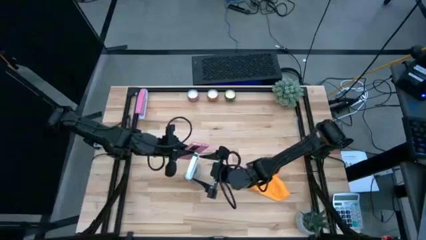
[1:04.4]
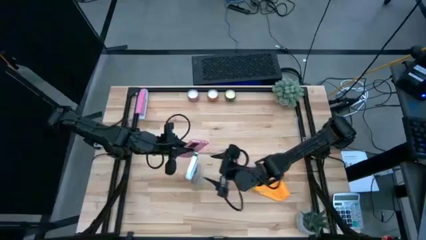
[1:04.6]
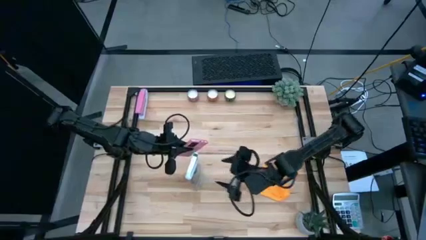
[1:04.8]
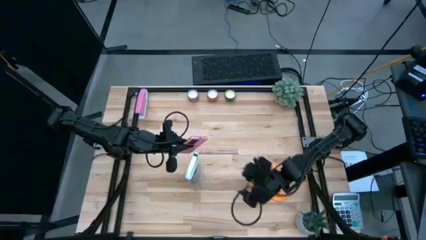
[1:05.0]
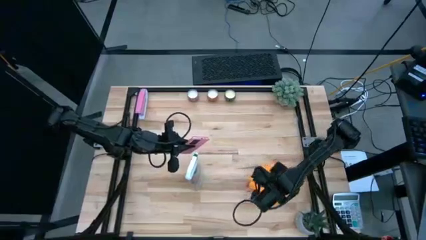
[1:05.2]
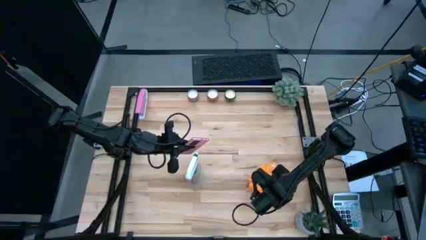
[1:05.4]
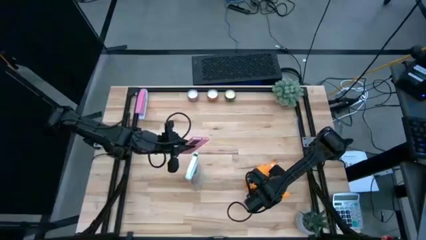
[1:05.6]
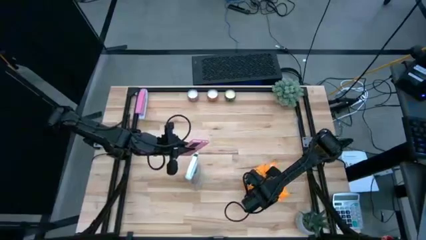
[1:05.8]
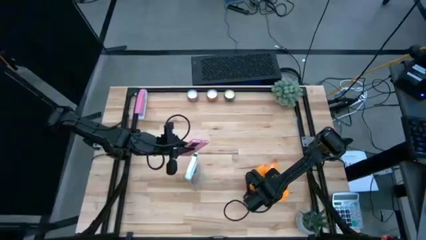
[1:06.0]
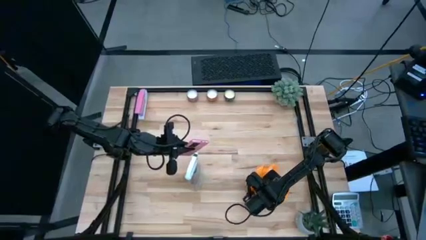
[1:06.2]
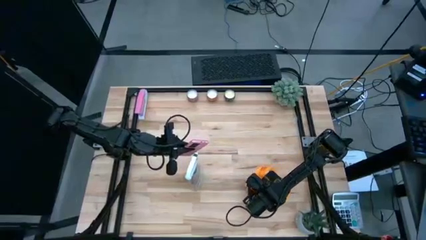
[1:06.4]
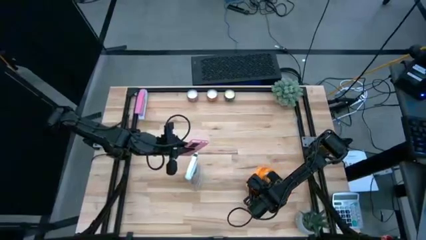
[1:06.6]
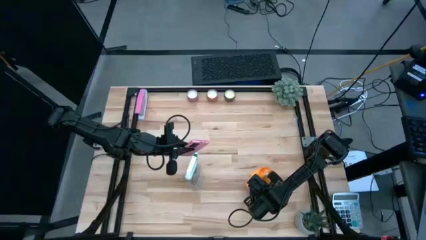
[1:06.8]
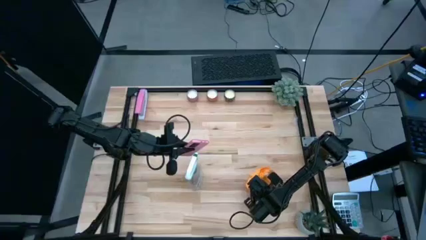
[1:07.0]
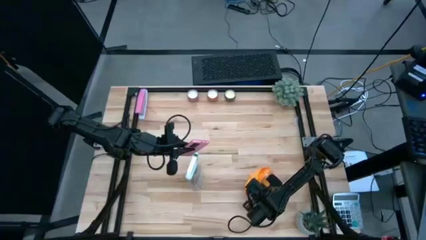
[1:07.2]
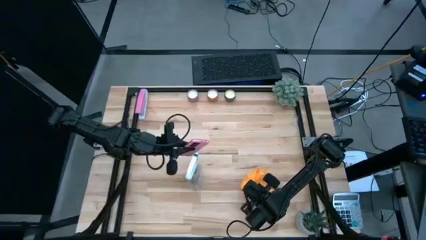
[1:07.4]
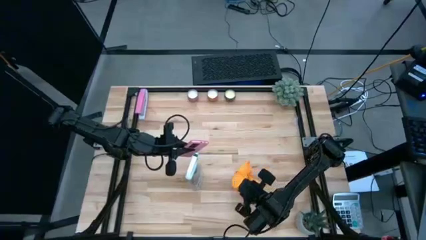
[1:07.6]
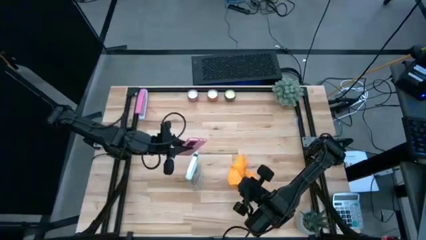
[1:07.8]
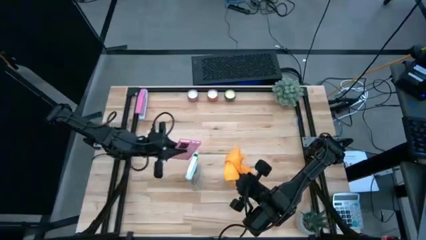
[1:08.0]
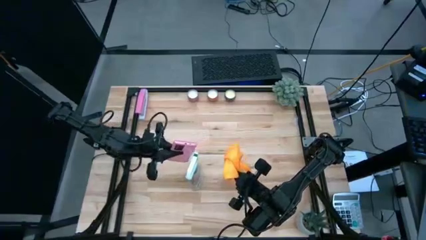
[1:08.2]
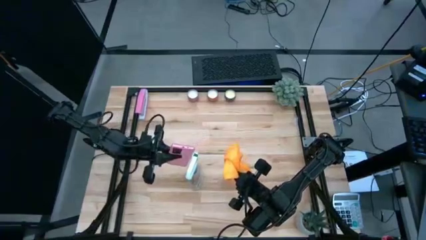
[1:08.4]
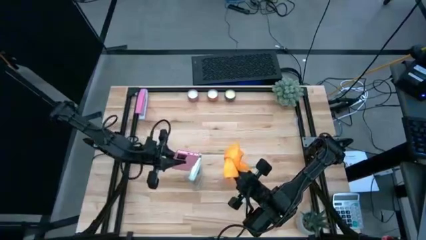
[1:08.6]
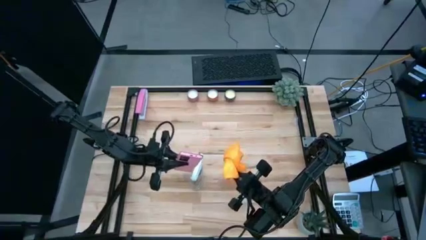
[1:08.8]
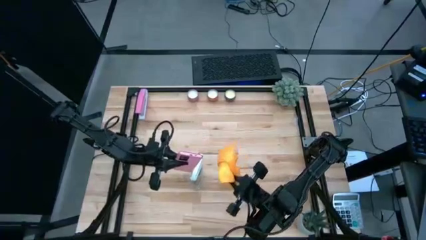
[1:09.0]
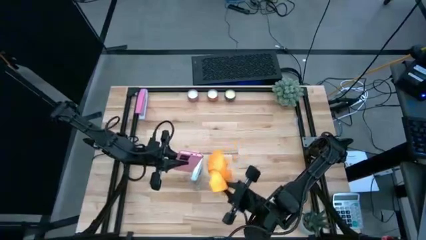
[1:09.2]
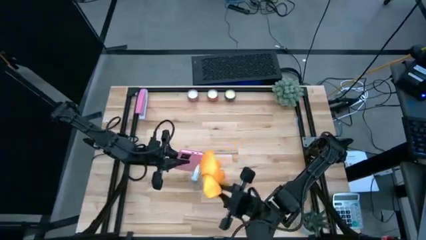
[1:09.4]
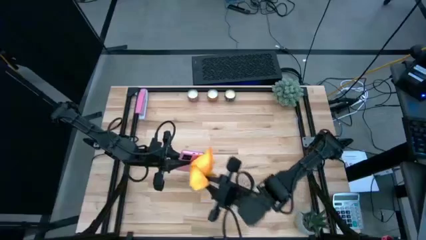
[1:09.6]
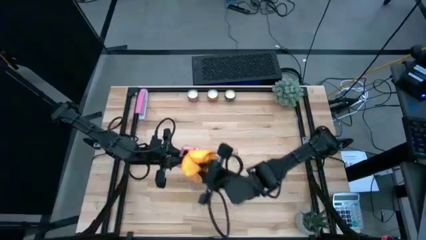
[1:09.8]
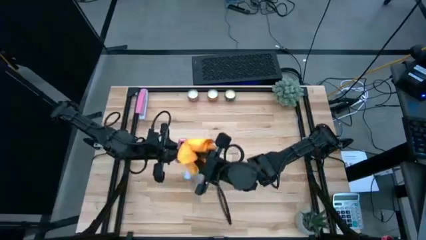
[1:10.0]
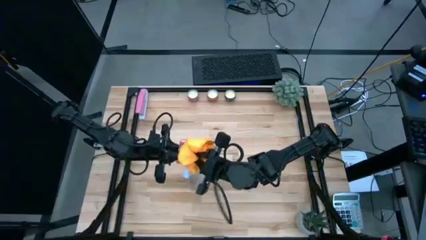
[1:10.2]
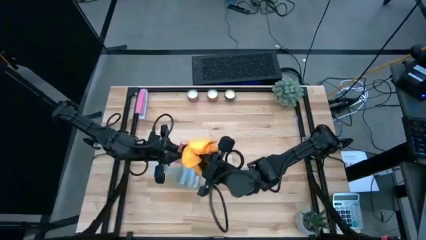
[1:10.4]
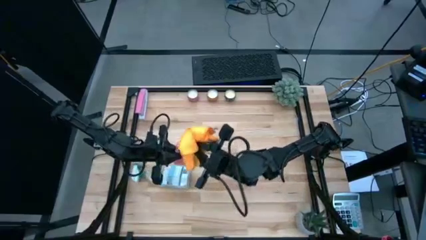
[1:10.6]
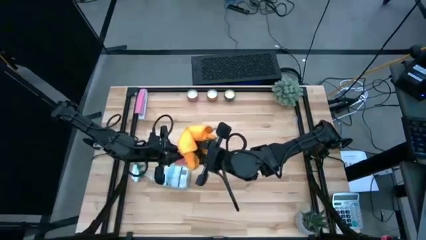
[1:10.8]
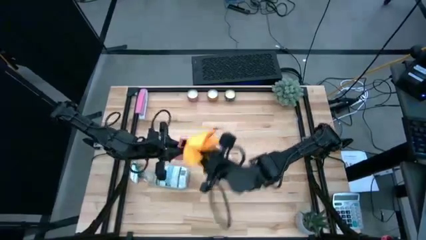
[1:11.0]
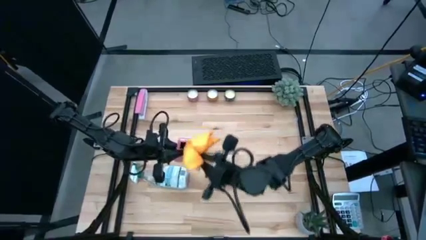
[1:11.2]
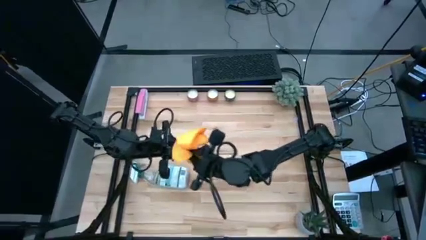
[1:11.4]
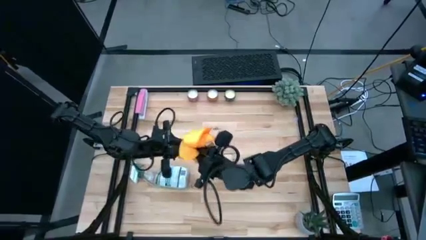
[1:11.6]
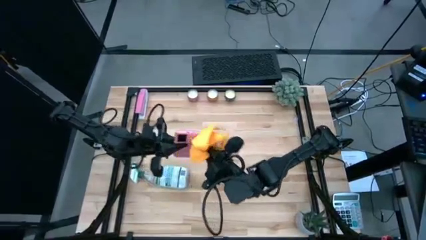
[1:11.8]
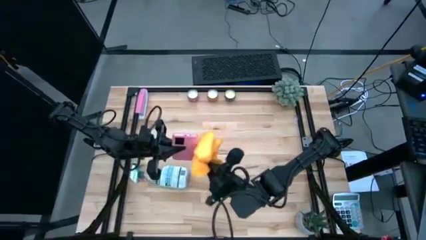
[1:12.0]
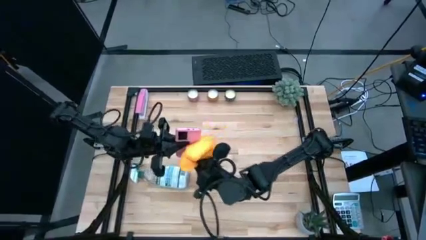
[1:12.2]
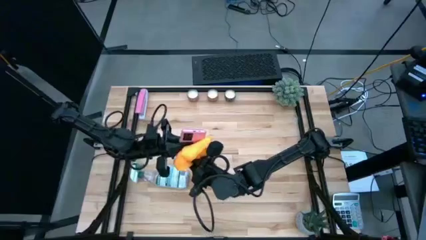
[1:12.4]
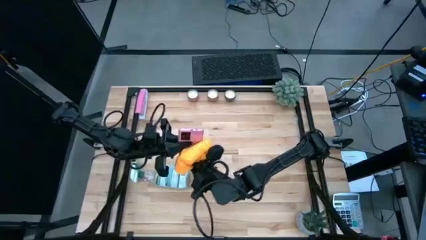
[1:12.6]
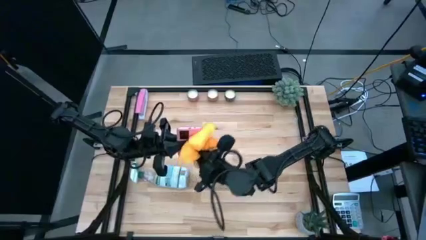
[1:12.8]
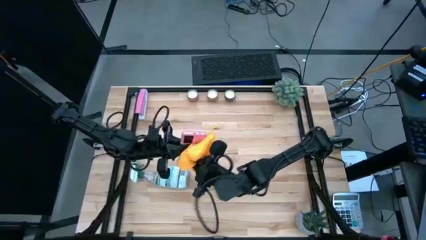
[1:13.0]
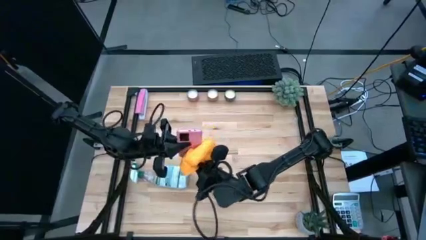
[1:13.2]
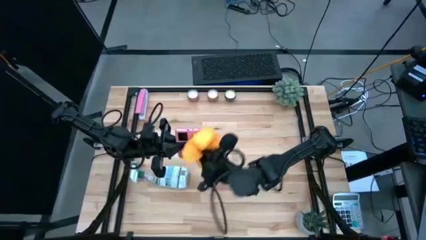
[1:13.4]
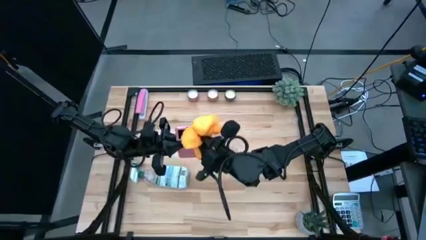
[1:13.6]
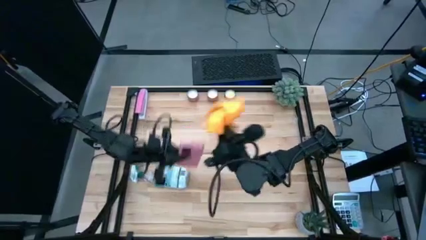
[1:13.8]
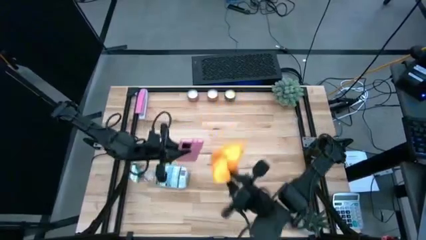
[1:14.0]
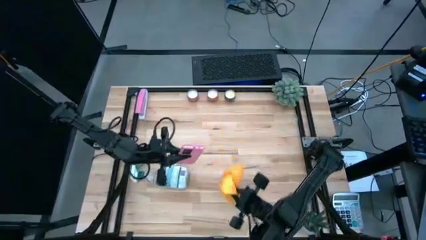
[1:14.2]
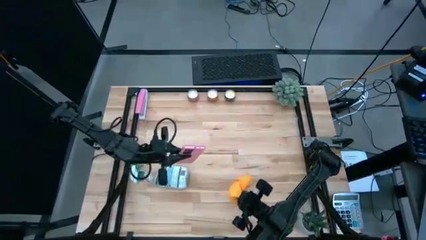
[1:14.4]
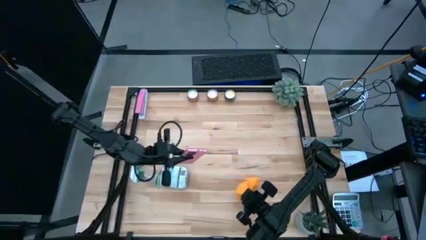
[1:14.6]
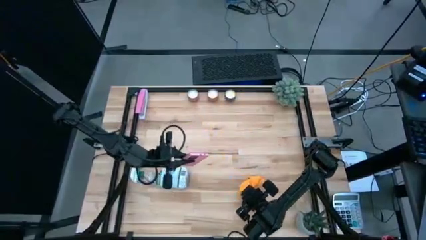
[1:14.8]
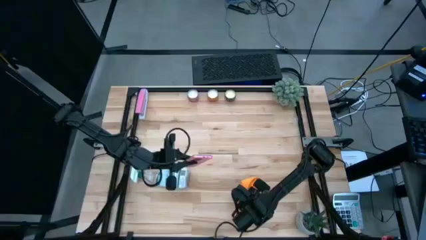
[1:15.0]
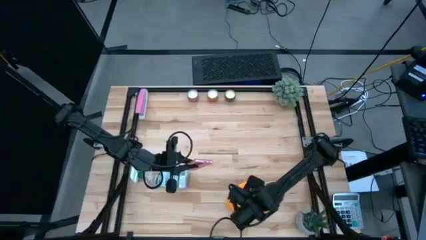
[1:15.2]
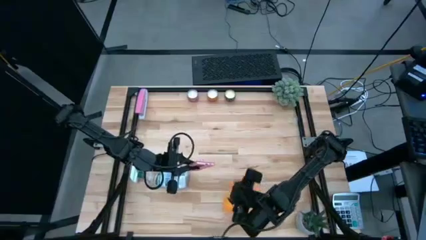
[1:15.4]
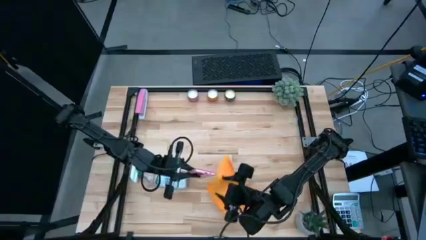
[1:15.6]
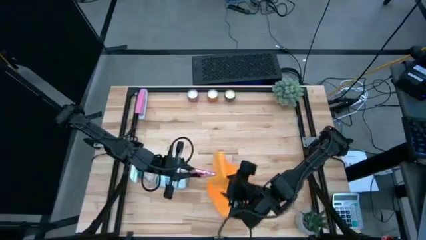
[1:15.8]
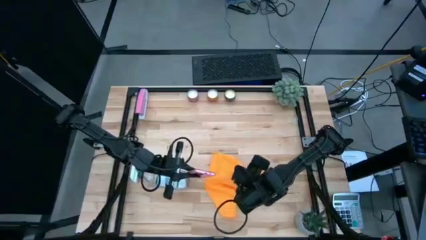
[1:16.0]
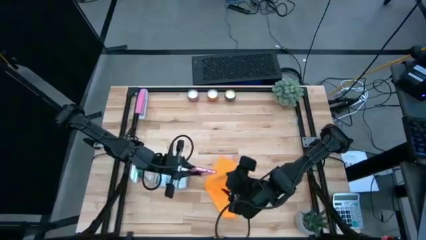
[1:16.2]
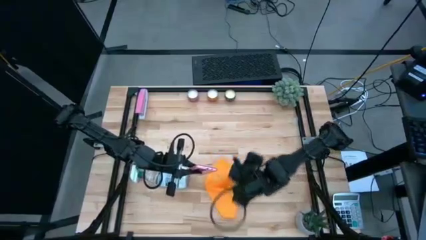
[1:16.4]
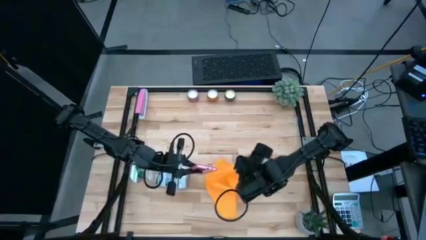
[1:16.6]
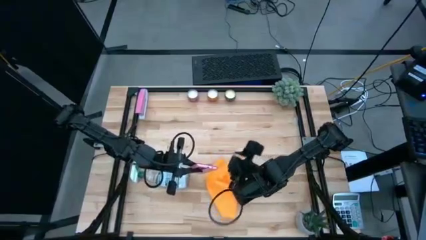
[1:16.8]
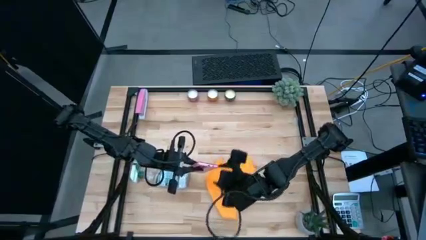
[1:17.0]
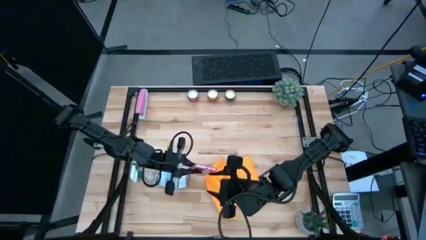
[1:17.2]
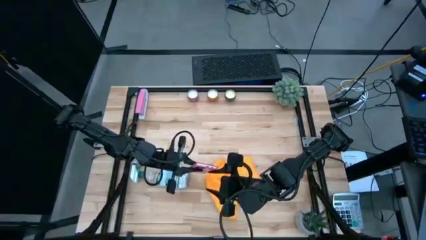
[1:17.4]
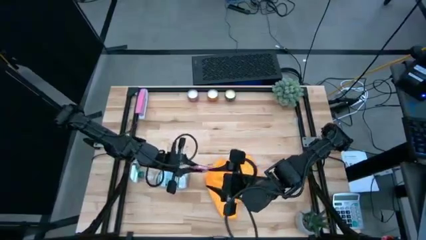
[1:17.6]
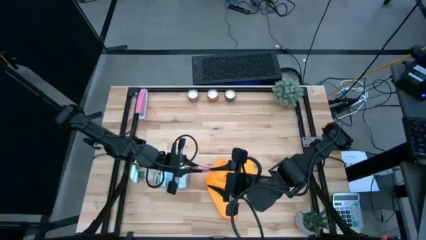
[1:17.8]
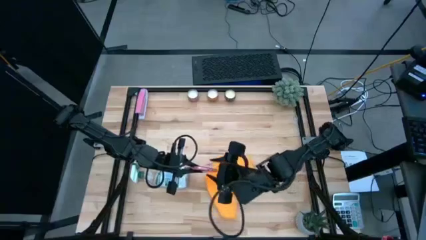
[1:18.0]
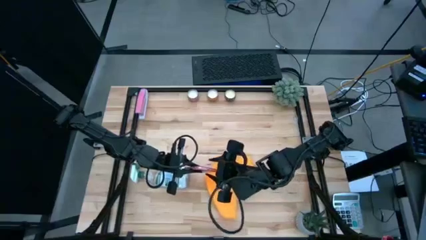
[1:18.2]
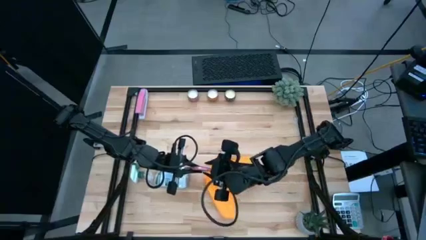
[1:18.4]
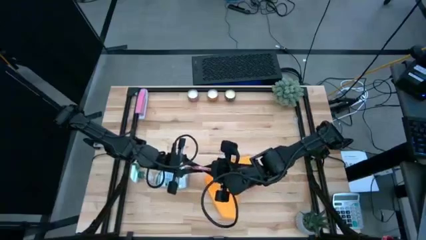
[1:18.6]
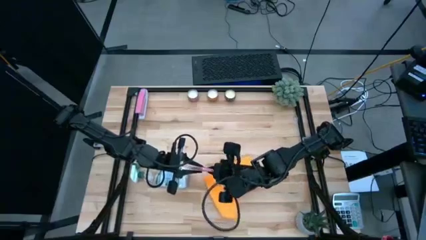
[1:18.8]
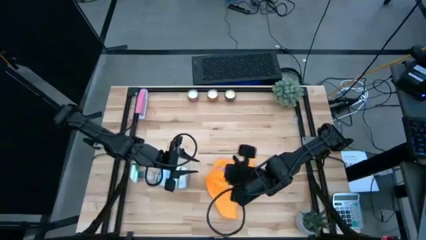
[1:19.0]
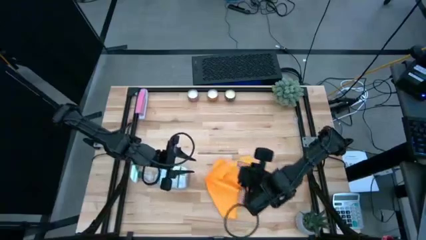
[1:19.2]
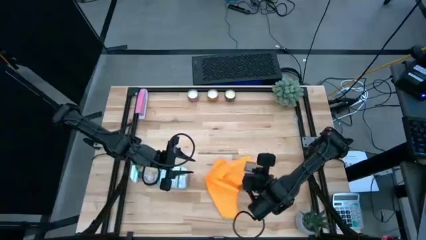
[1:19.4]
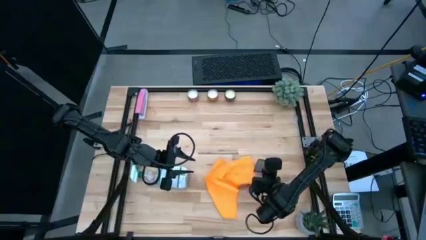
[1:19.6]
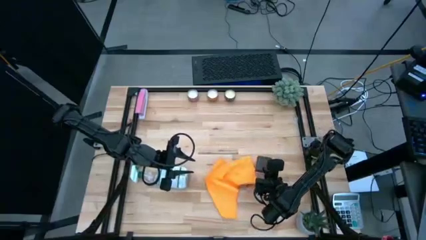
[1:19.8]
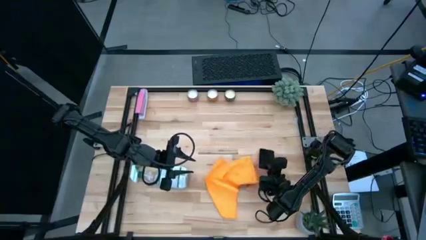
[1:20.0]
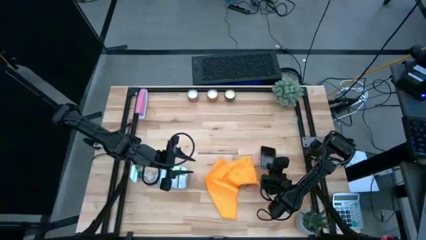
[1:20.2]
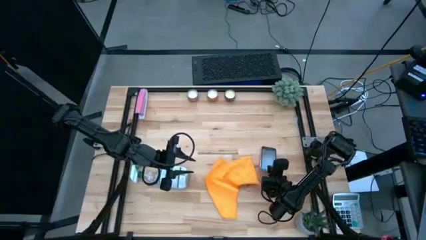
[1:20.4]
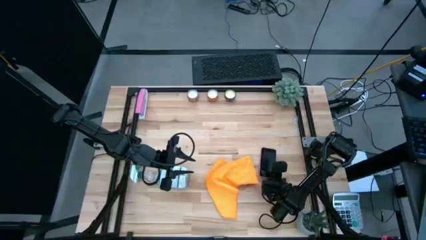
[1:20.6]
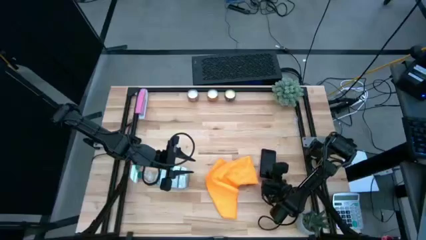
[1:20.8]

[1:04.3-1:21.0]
Task: Apply microfiber cloth
Wipe the back of the cellphone with a microfiber cloth

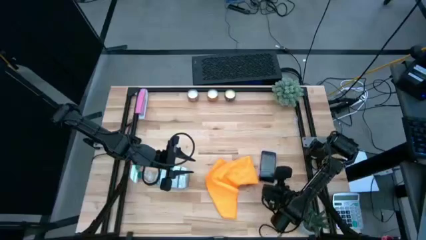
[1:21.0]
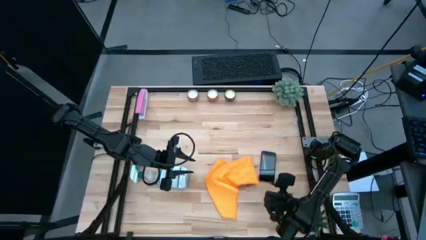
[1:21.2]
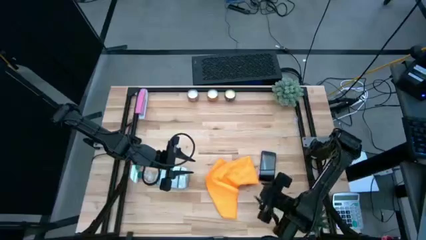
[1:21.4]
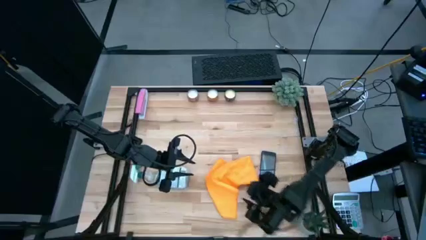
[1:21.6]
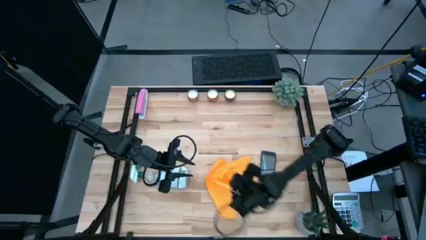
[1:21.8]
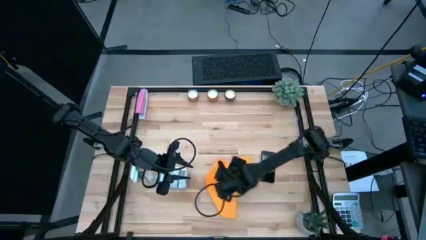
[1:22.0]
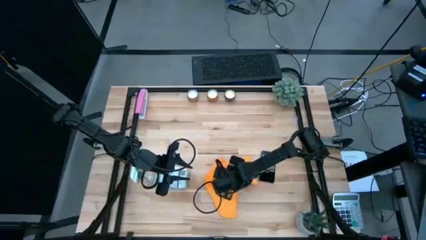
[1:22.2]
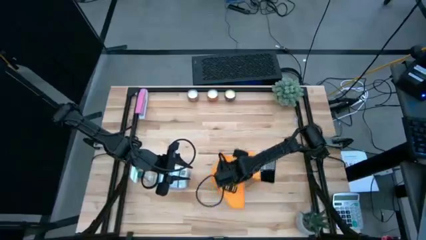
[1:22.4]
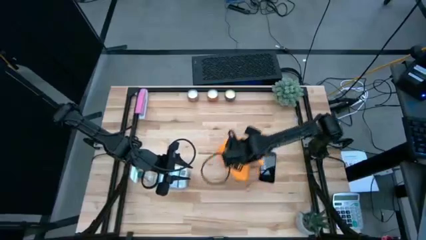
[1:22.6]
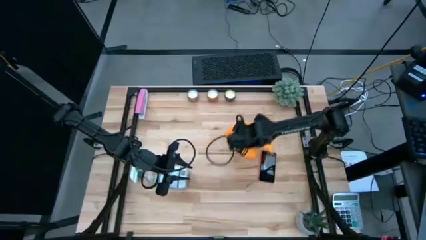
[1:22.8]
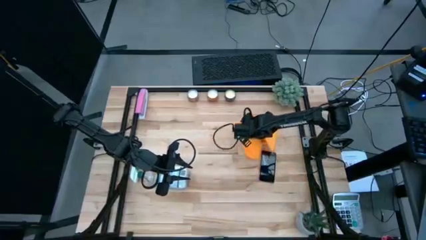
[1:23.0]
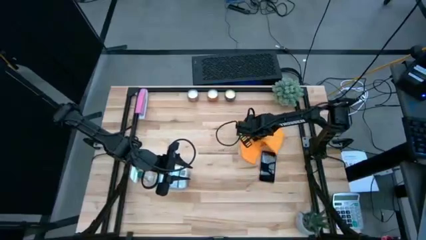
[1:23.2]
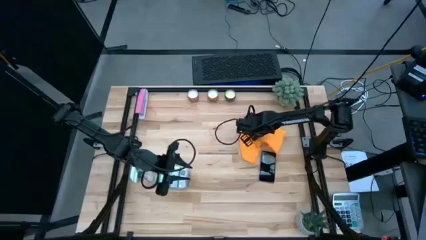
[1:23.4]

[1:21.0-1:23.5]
Move the microfiber cloth to the top of the cellphone
